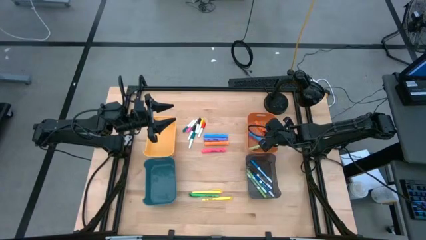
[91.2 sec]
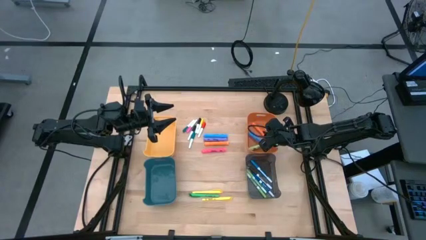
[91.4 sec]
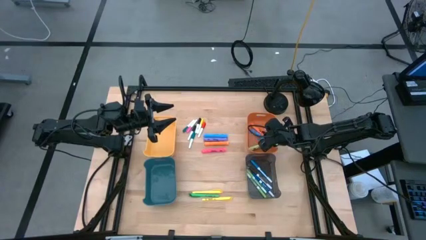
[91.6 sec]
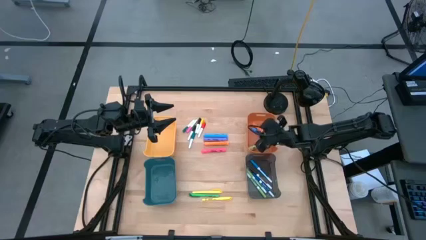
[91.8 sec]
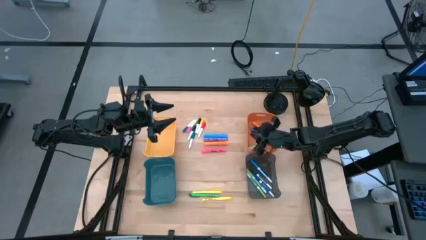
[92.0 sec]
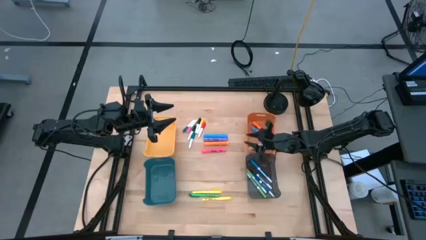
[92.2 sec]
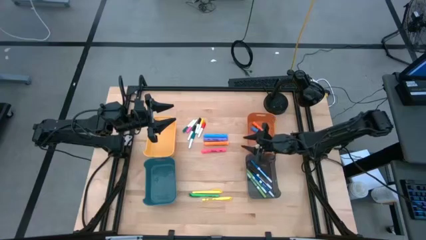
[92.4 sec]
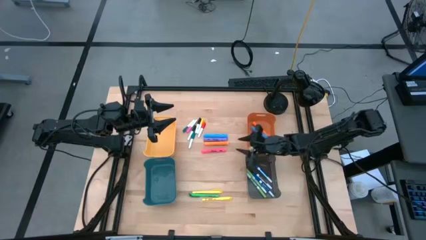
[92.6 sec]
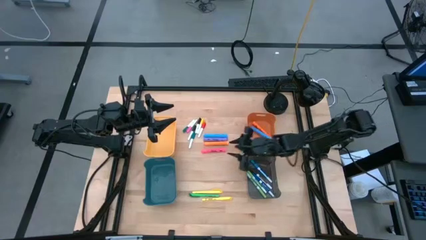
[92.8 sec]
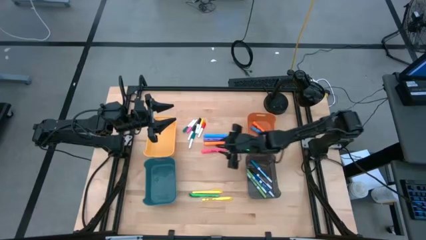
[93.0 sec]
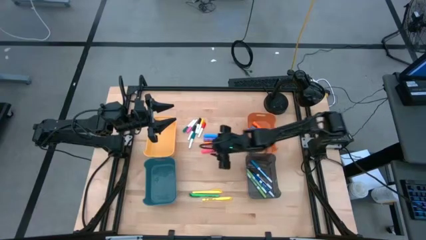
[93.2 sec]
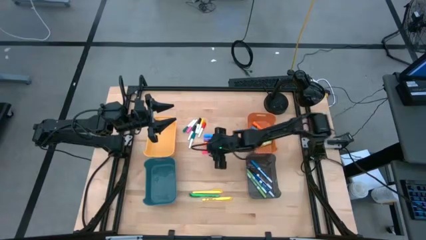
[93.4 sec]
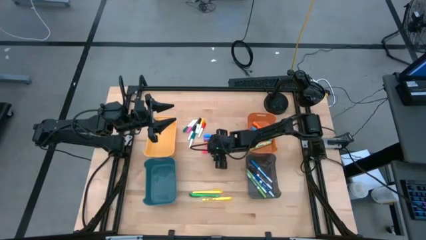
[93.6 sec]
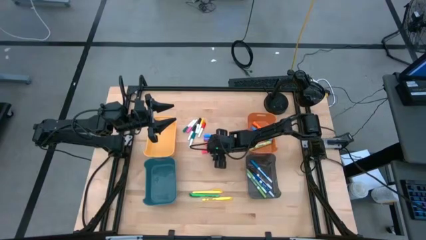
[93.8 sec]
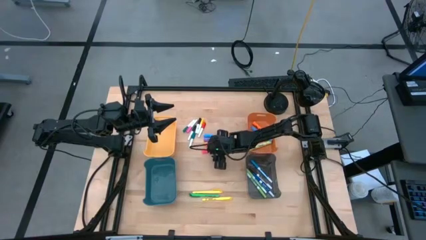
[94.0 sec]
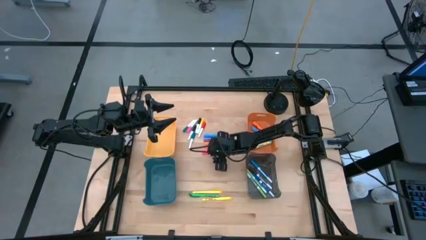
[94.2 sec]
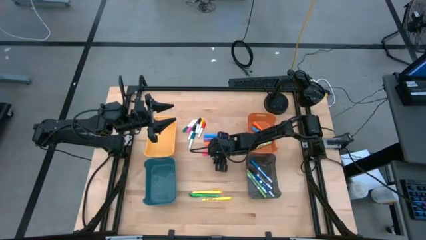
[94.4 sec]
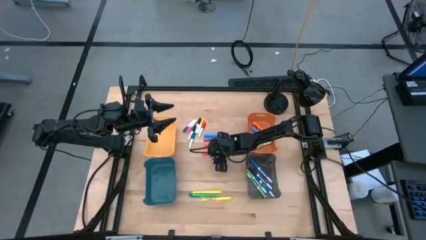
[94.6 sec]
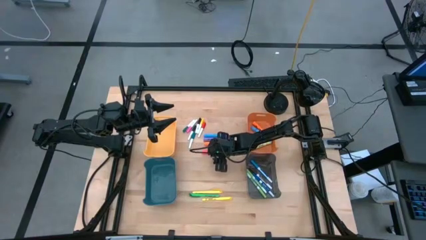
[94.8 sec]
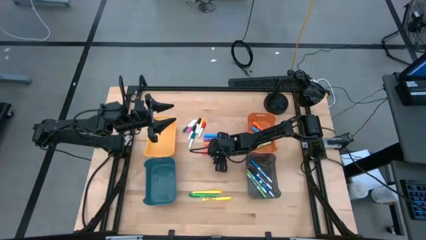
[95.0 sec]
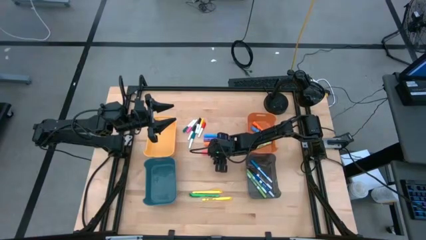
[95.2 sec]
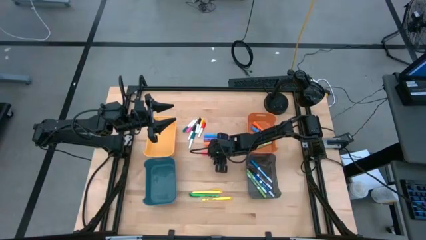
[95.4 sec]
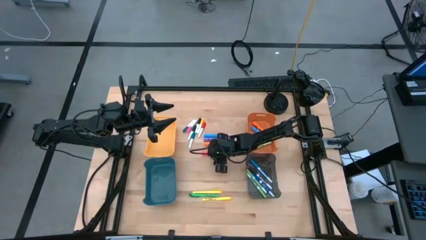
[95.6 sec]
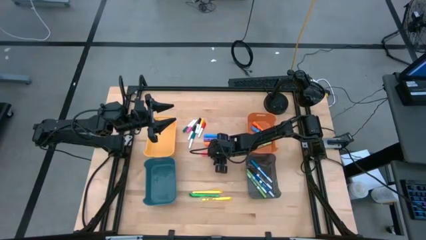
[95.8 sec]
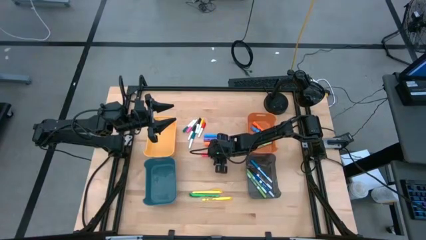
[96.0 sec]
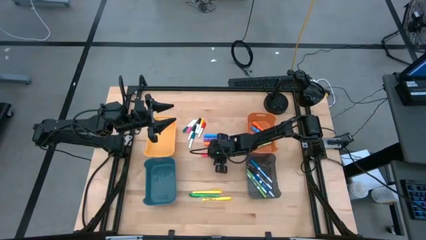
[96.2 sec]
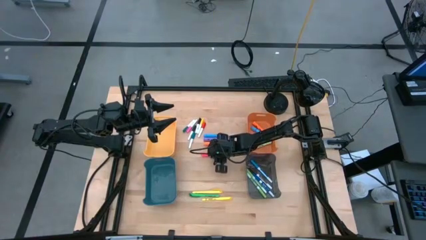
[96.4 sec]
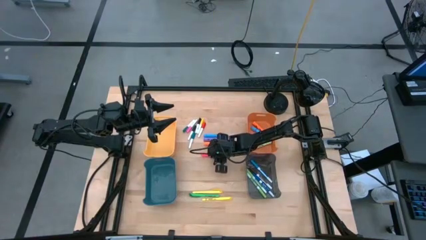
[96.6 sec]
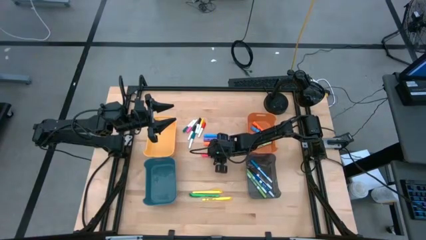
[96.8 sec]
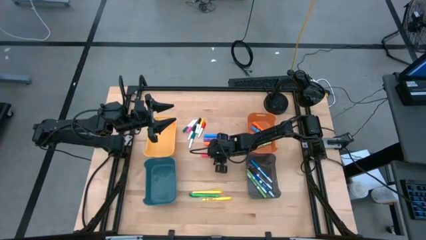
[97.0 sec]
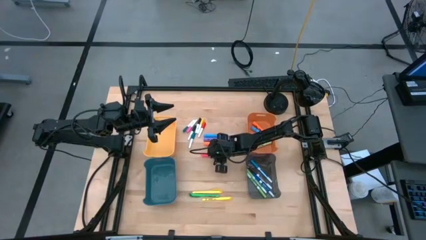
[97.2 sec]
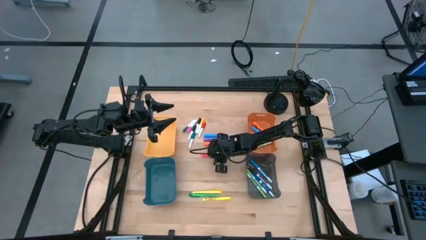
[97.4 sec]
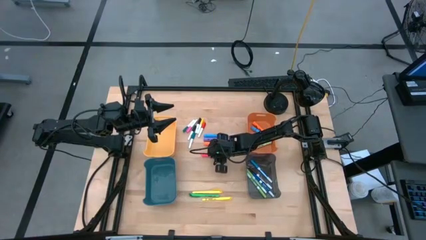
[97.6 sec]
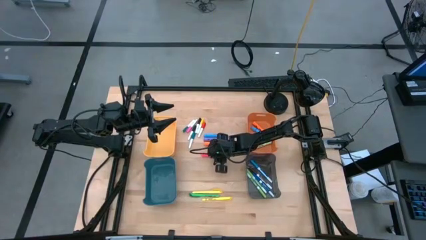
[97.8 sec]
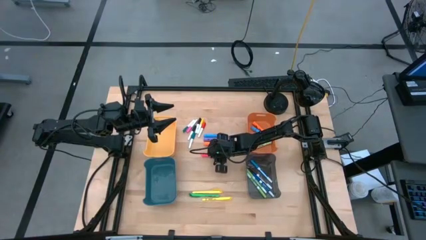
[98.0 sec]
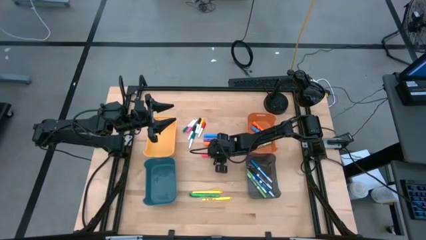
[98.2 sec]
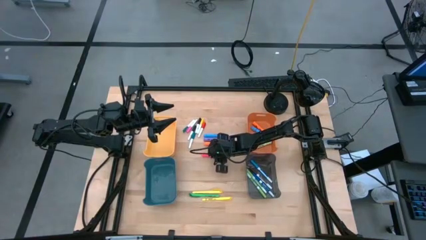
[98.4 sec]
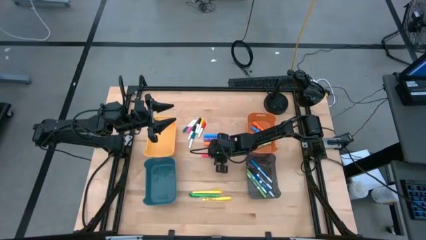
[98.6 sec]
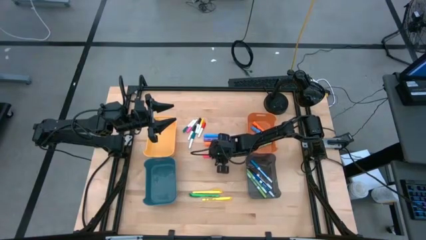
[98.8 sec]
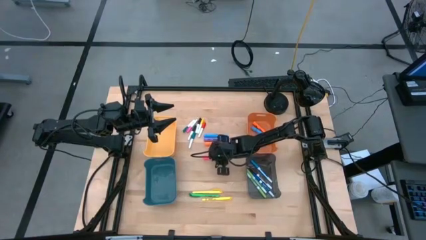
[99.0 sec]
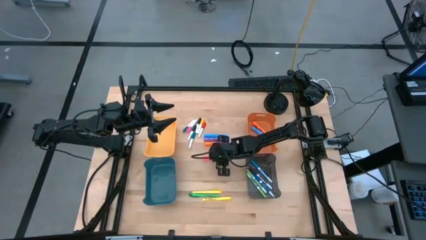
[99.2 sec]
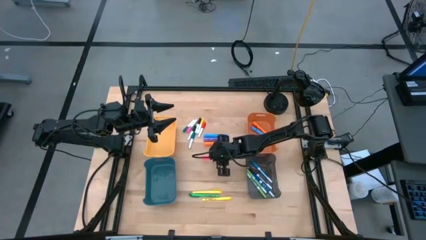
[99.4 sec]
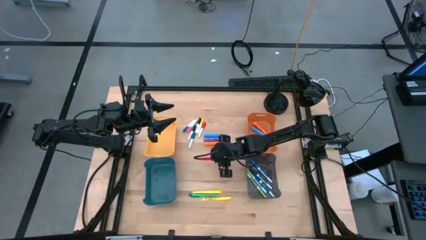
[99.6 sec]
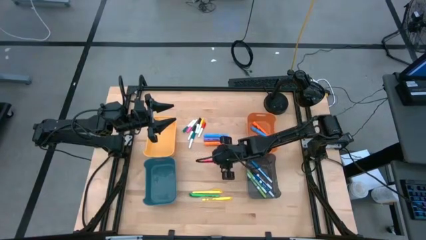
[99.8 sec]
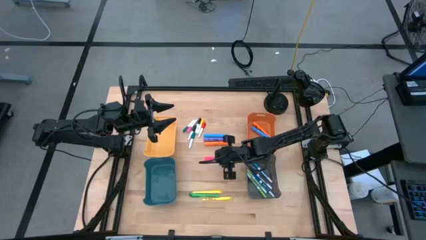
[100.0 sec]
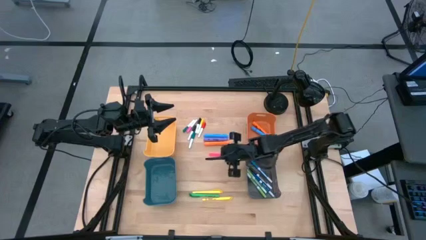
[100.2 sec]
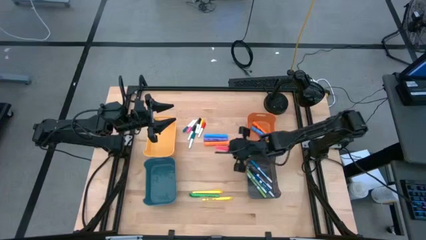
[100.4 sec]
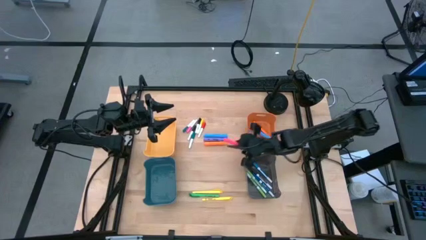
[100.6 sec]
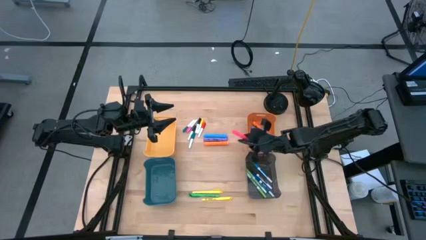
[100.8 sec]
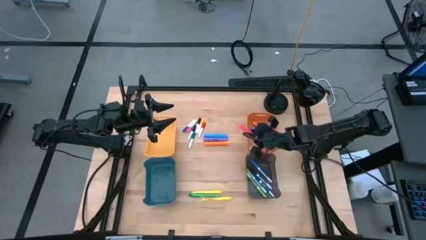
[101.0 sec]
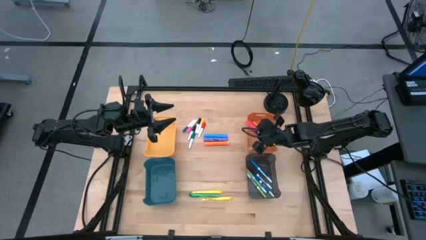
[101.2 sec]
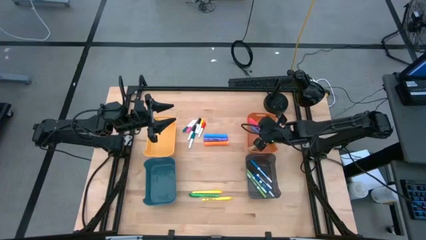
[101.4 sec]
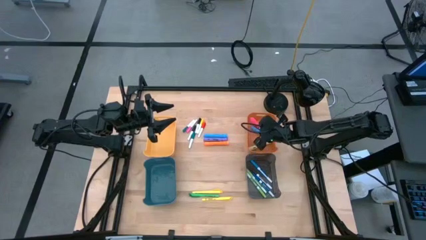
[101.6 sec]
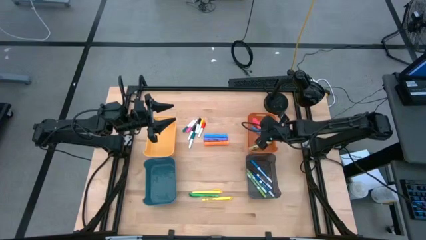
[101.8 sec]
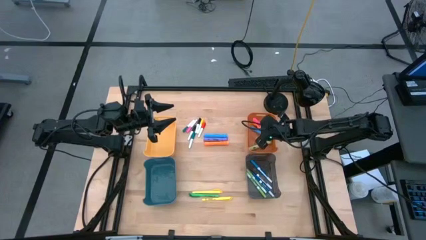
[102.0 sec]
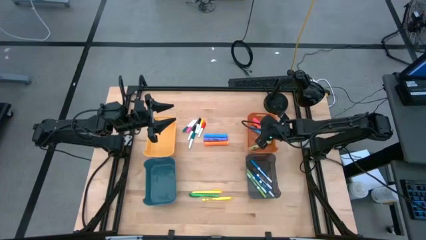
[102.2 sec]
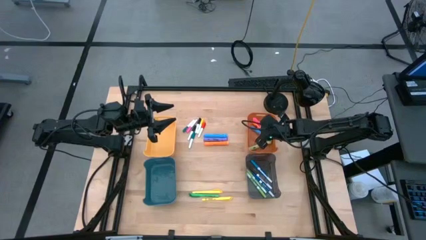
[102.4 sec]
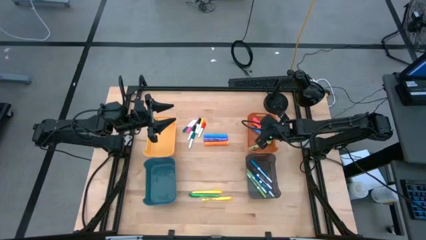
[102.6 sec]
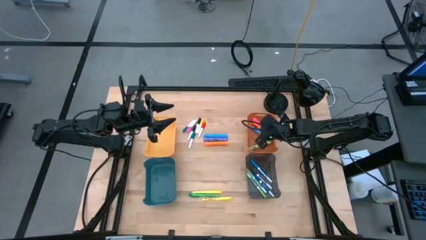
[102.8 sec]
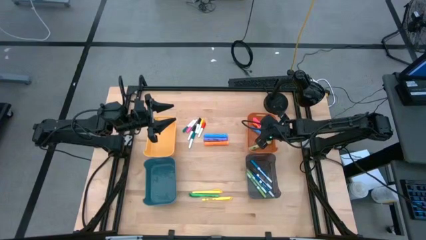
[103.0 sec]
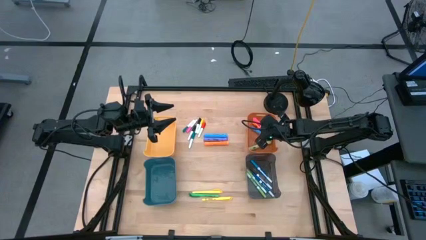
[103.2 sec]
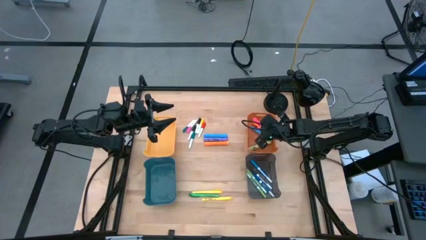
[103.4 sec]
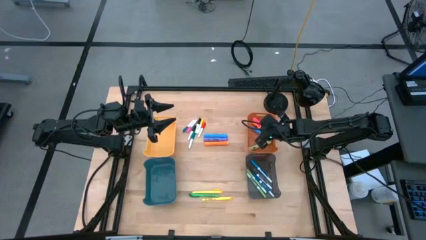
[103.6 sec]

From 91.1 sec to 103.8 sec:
Task: Pick & Place Markers
Put the pink highlighter into the orange bin

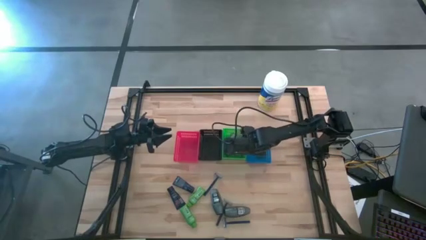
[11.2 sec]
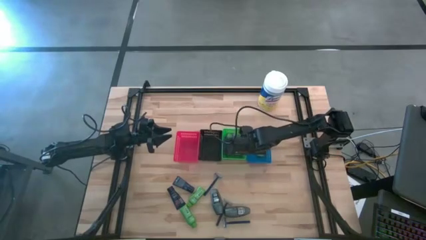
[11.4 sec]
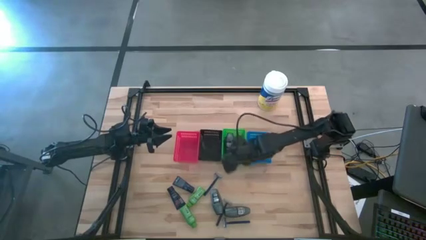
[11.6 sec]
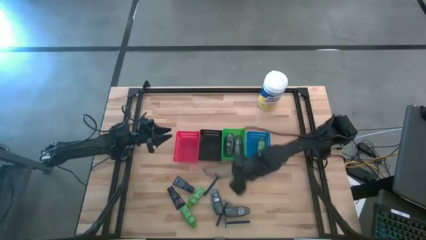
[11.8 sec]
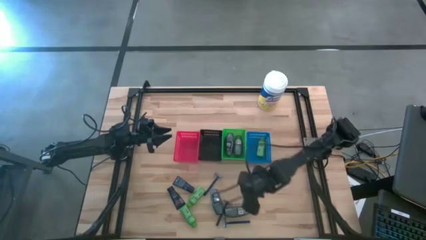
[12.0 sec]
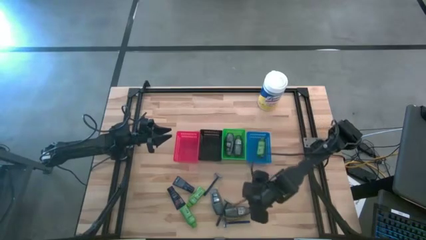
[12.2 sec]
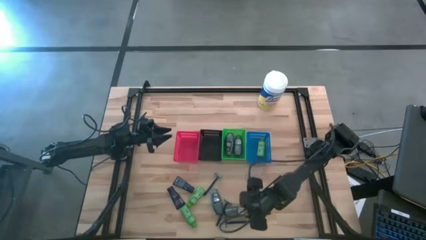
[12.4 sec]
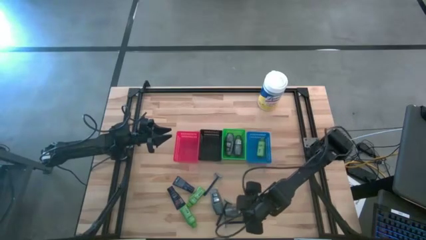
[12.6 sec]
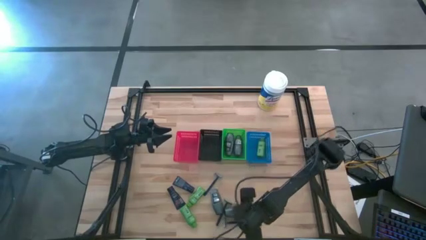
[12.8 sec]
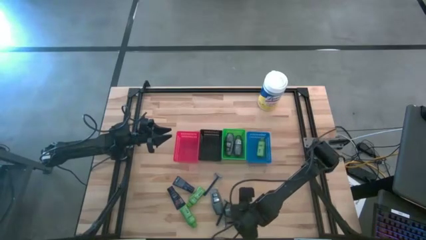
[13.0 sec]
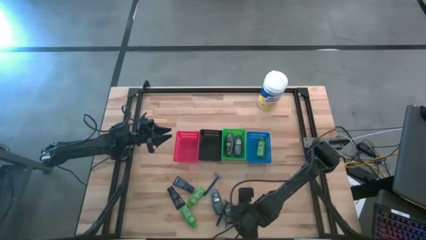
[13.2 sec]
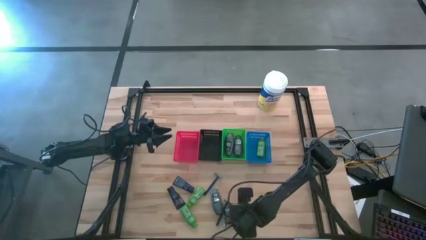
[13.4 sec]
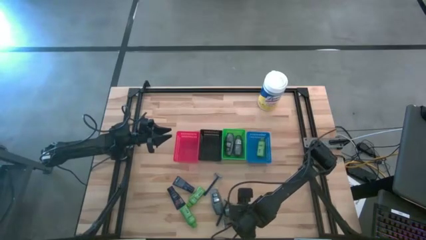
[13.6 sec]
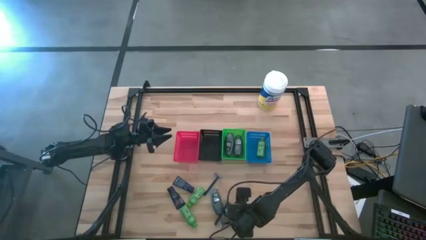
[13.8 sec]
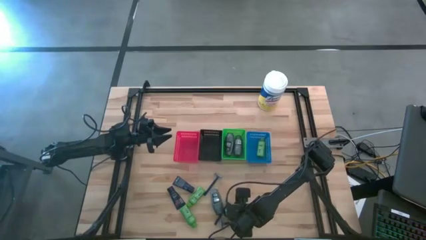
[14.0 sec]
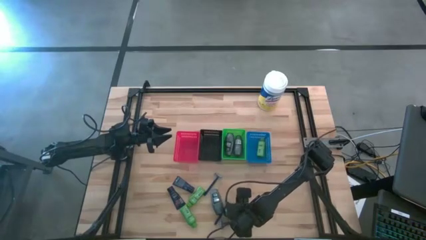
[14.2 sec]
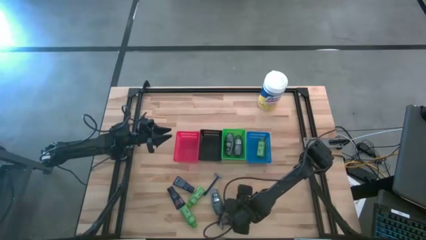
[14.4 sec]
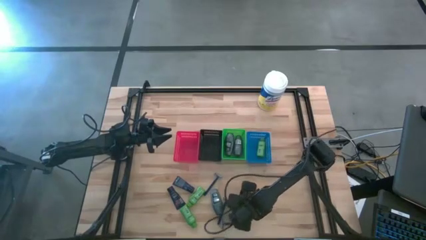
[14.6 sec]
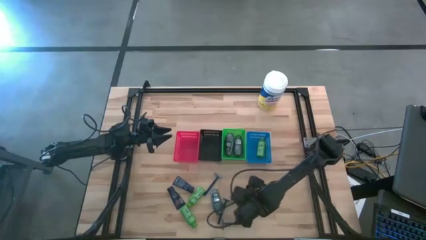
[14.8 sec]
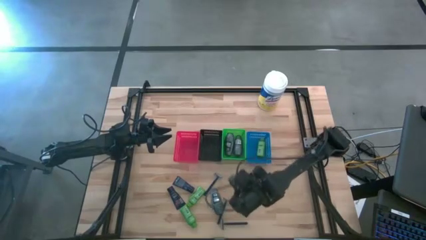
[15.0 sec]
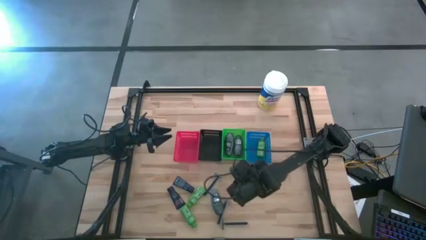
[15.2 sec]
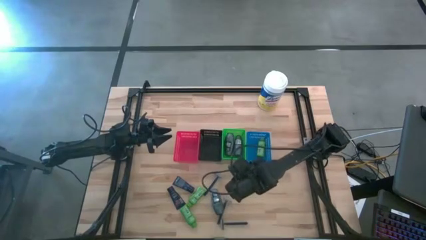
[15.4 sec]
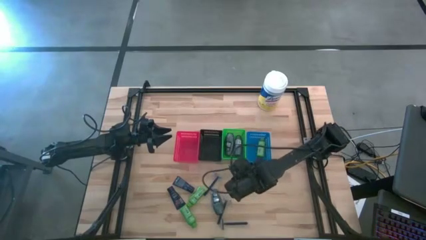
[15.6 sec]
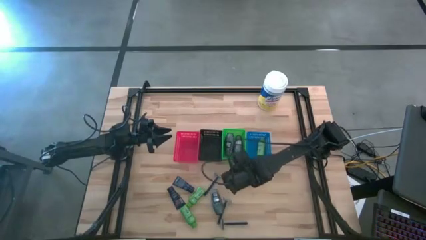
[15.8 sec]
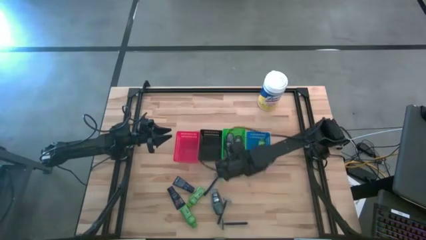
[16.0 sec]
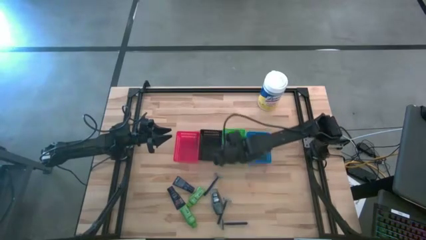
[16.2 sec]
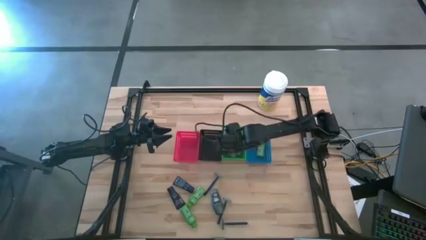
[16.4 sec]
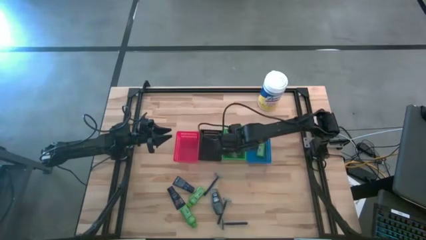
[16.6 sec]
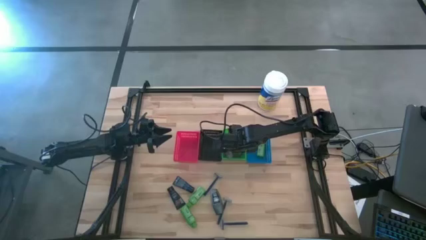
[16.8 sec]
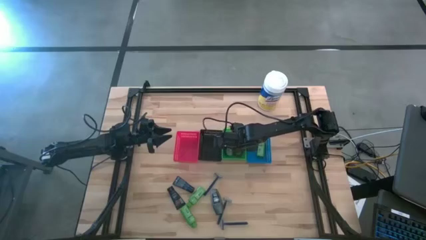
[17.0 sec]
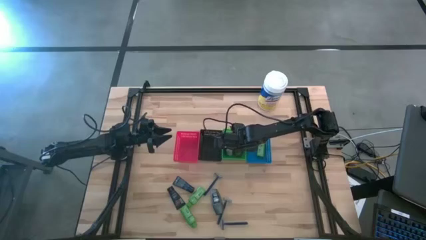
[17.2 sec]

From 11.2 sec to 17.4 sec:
Task: Pick & Place Travel size toiletries
Put the gray deodorant into the green basket
